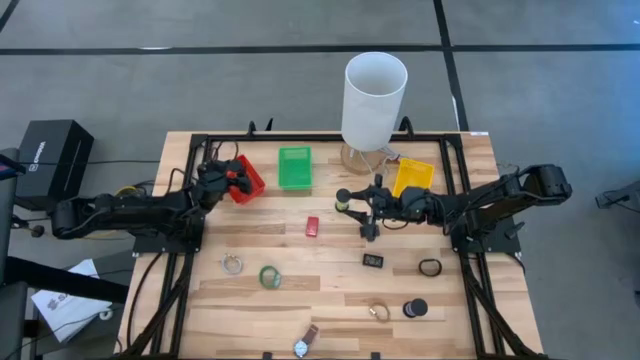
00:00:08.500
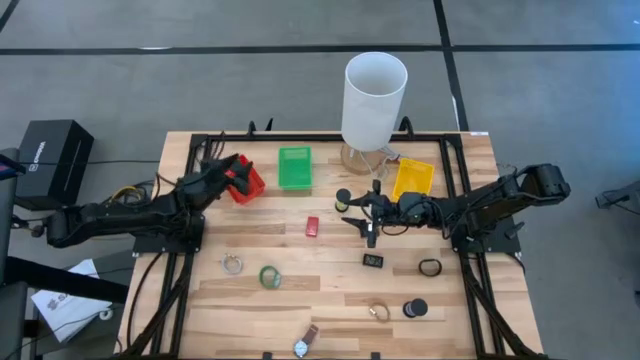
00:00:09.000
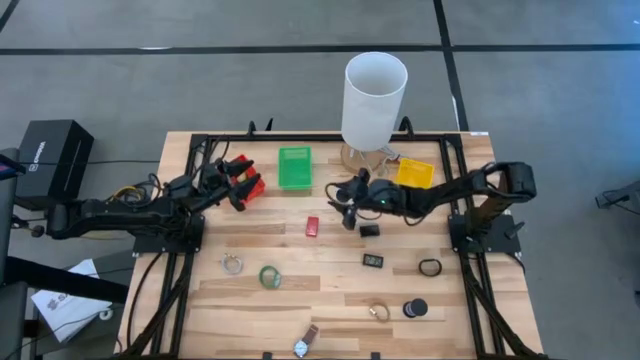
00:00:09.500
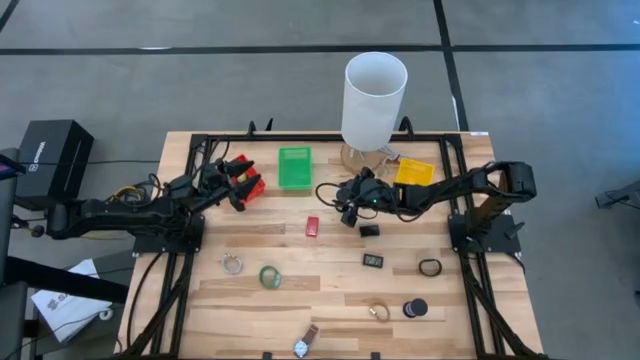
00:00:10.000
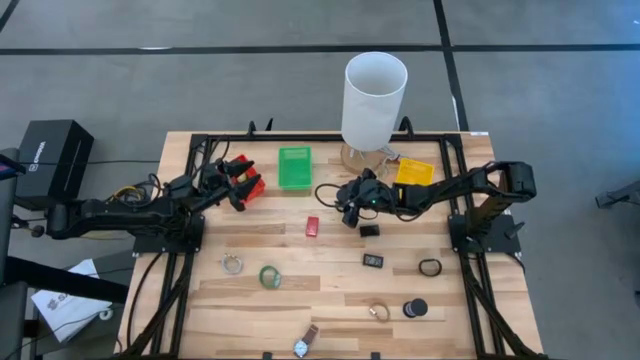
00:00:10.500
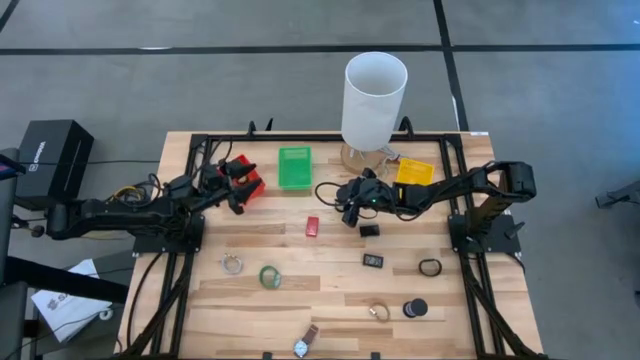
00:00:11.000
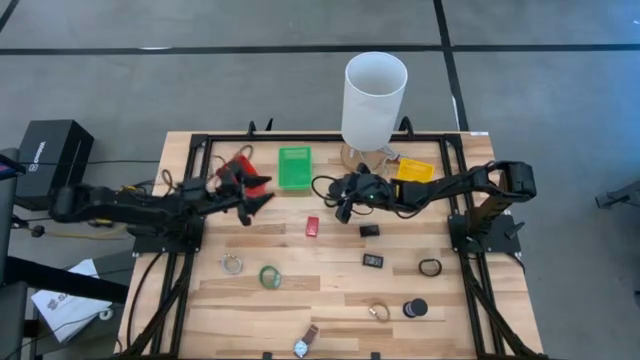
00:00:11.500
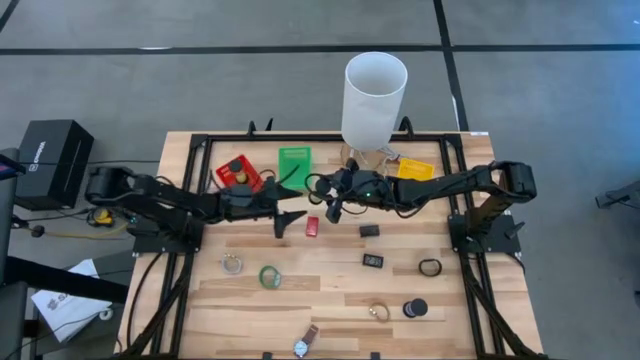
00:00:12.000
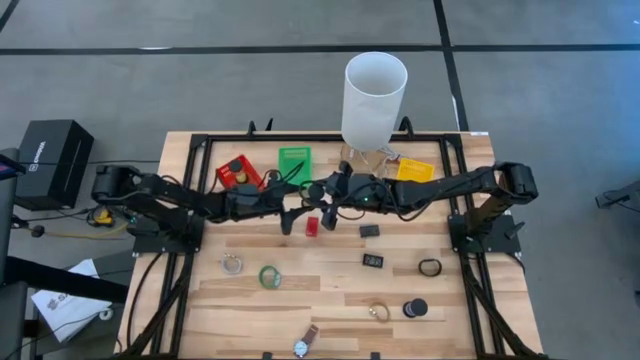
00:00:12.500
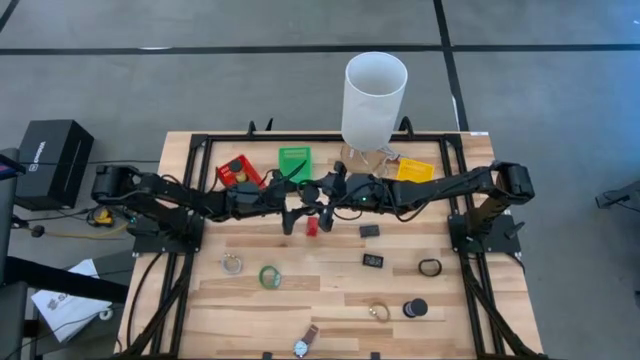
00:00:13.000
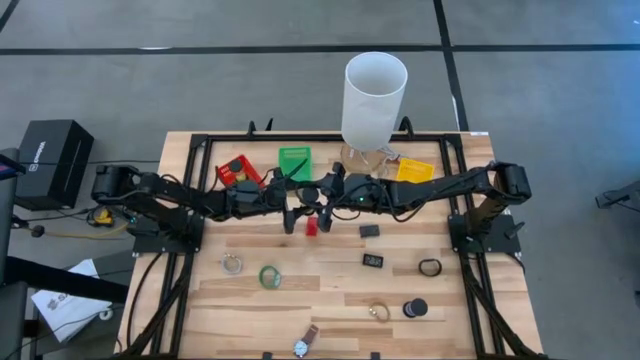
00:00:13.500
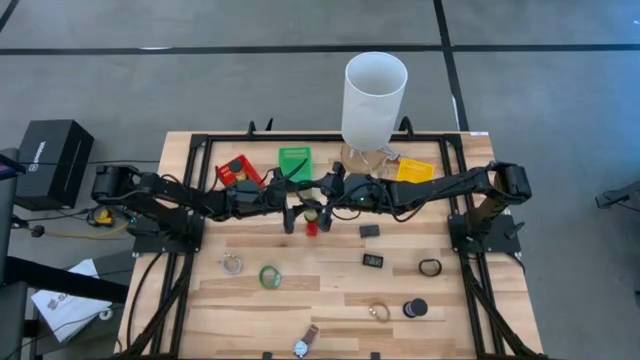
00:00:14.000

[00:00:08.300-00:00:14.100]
Task: Pick & Place Office items
Put the green hourglass into the orange bin

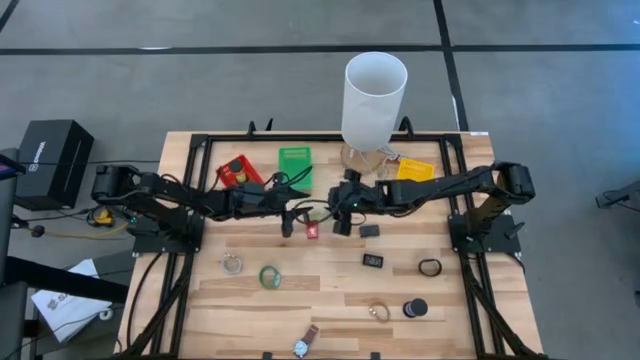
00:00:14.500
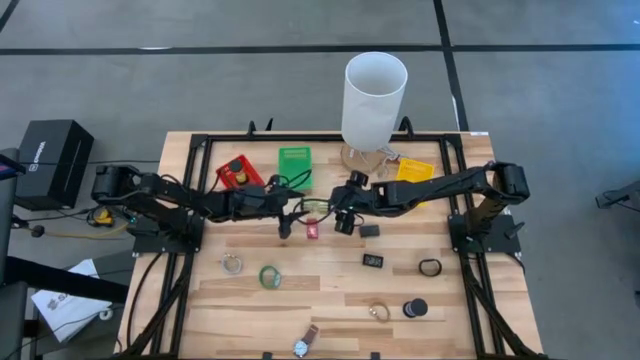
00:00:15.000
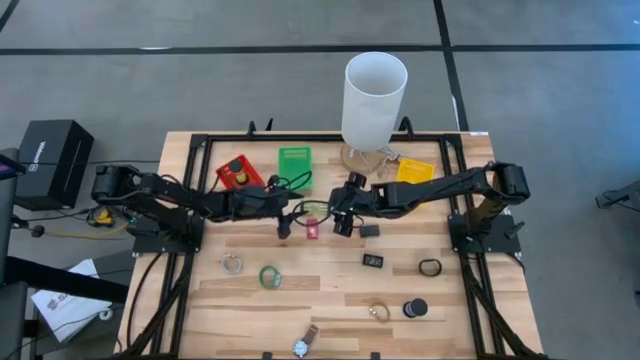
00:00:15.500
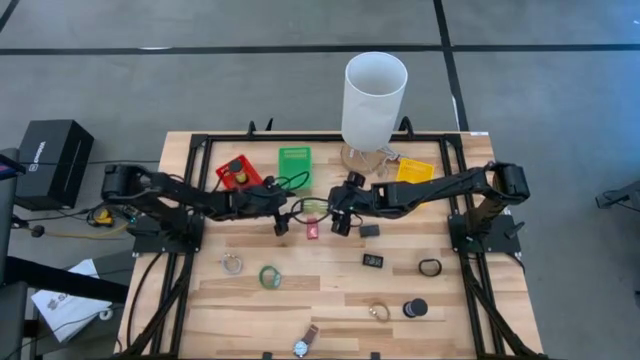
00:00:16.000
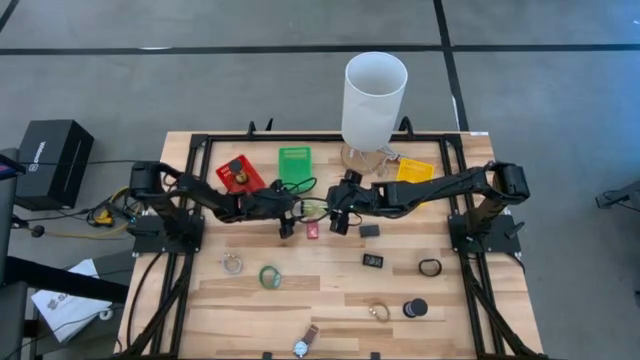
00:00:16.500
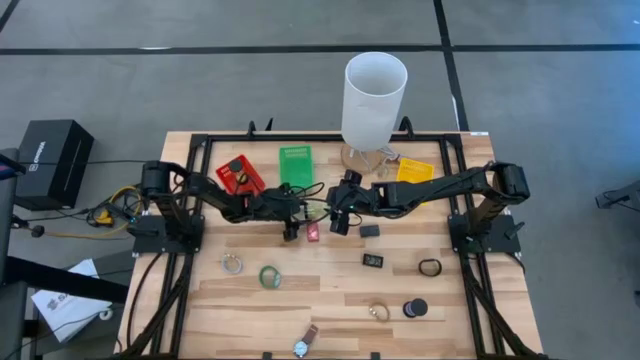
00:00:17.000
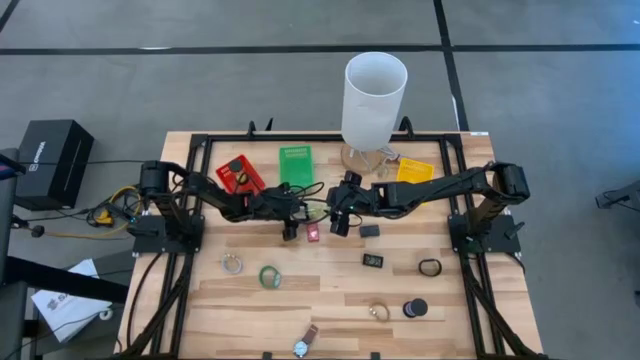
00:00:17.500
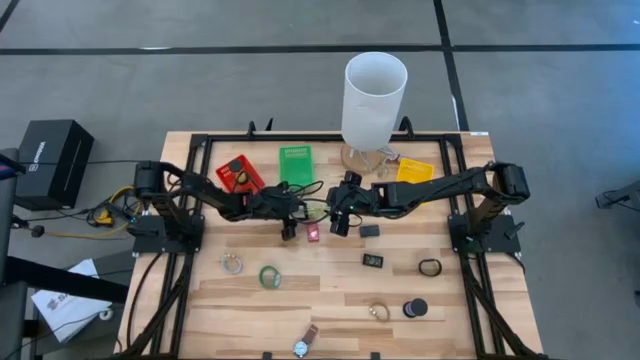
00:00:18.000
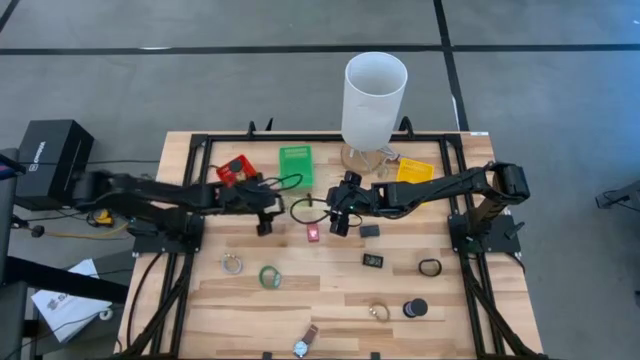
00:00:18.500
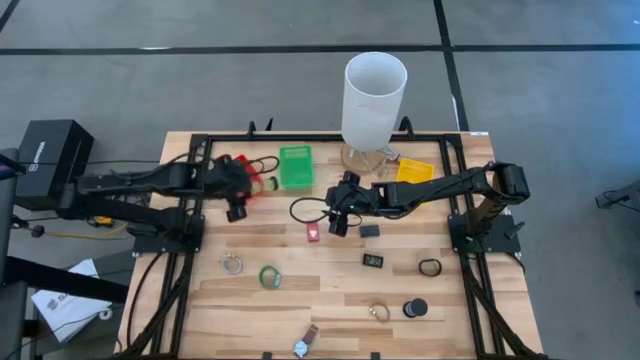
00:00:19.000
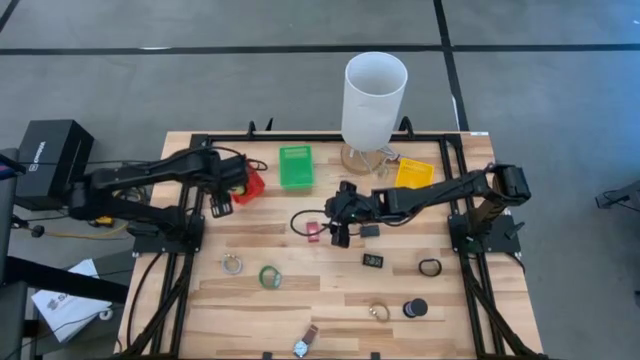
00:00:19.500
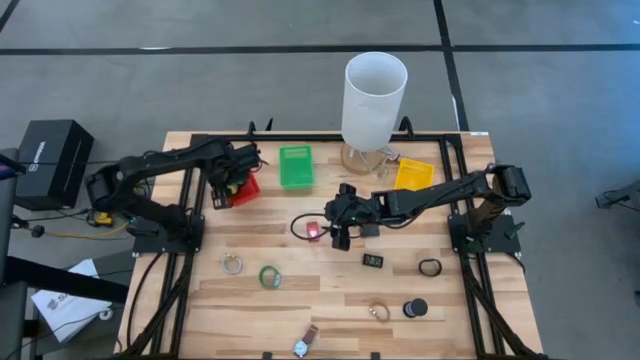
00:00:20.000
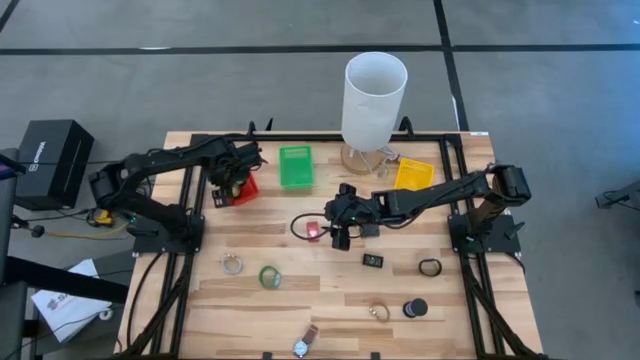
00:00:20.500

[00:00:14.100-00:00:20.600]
Put the green hourglass into the orange bin

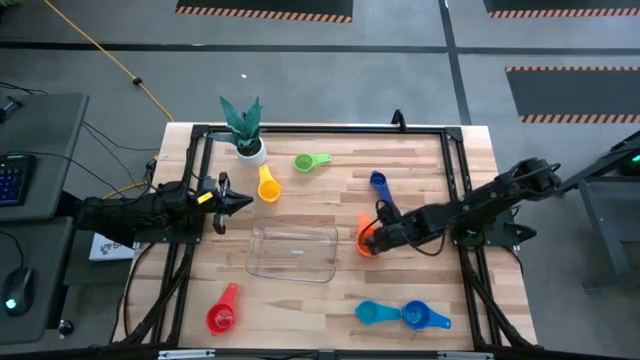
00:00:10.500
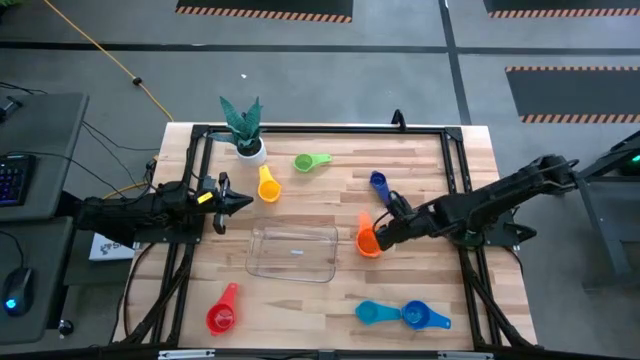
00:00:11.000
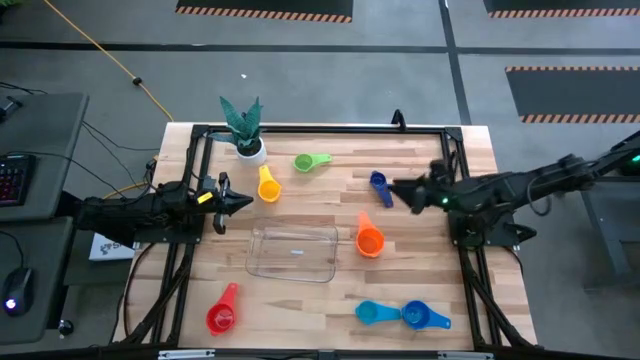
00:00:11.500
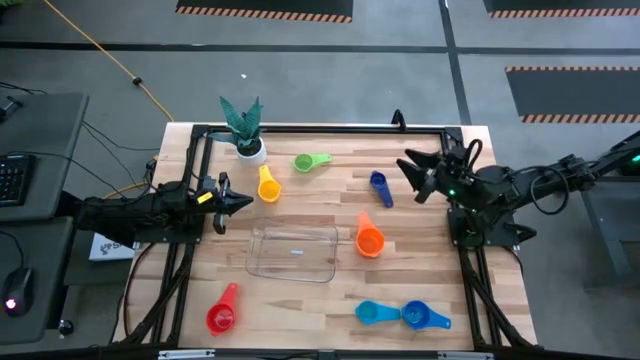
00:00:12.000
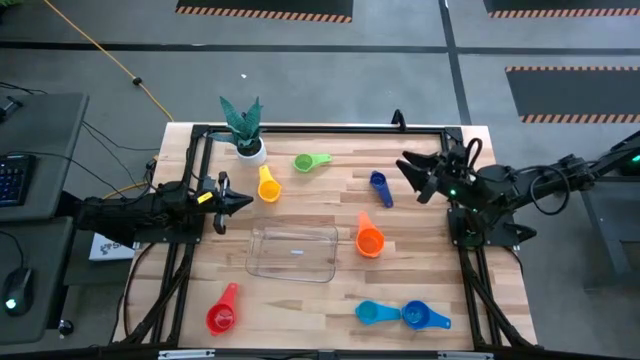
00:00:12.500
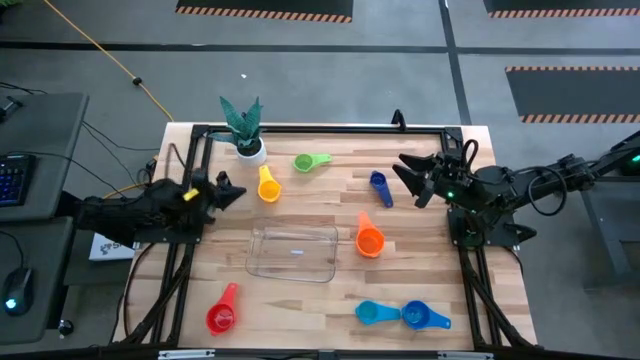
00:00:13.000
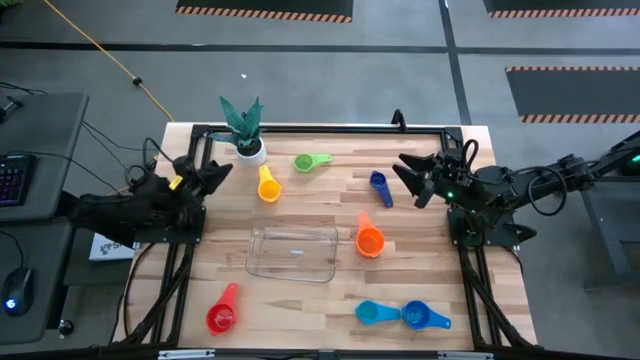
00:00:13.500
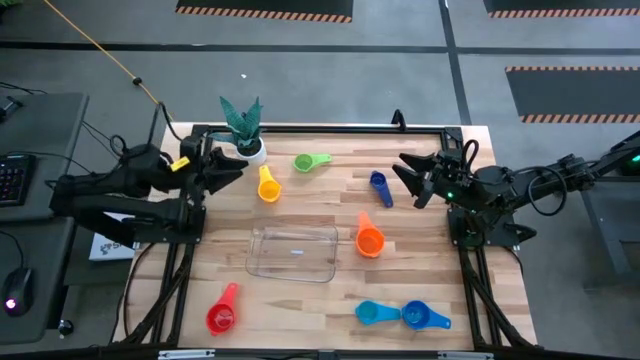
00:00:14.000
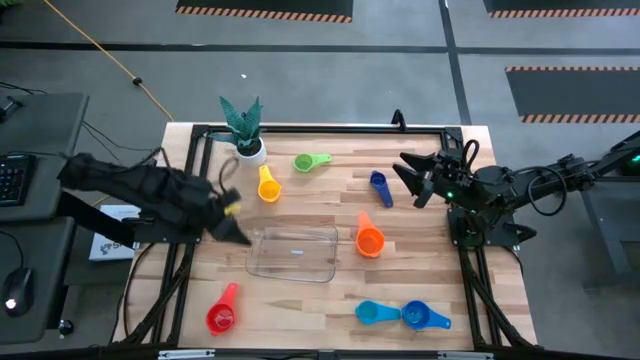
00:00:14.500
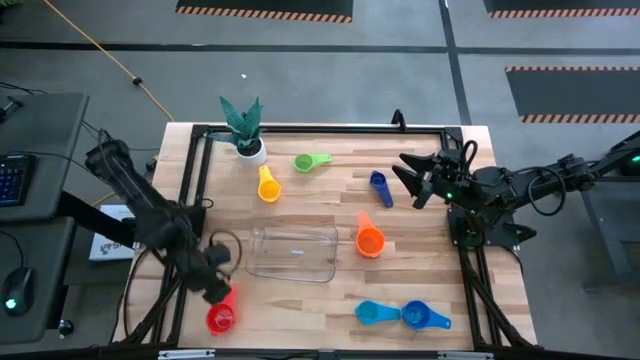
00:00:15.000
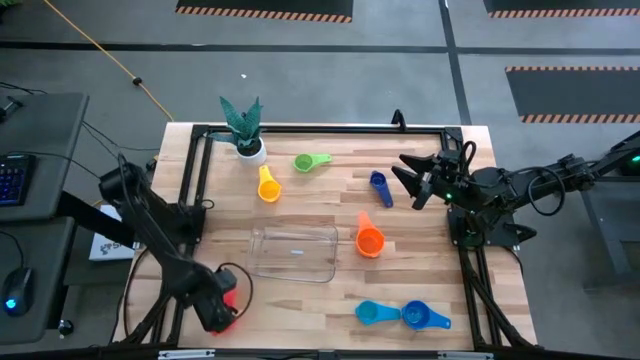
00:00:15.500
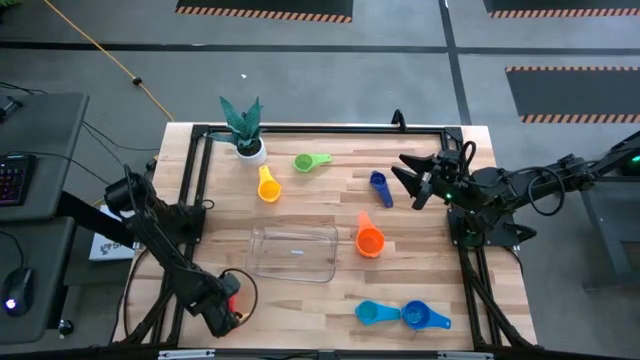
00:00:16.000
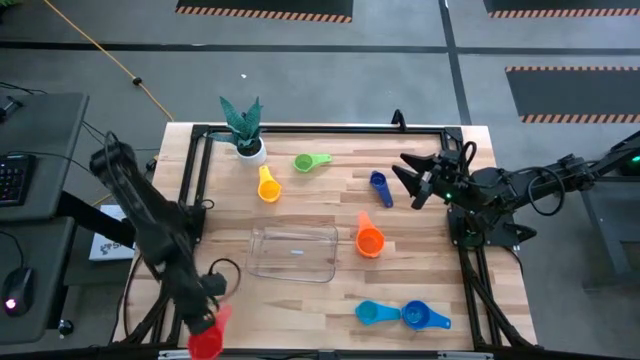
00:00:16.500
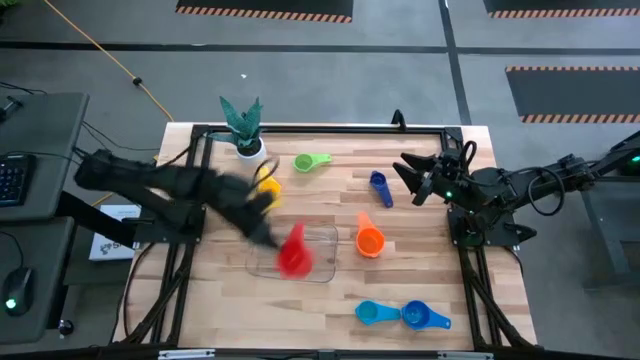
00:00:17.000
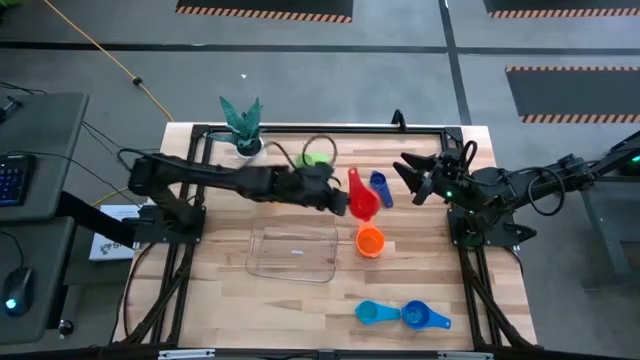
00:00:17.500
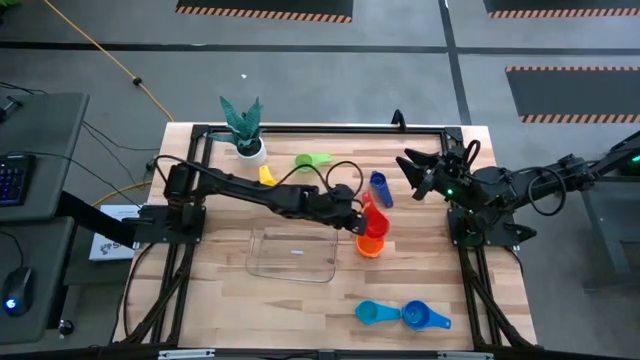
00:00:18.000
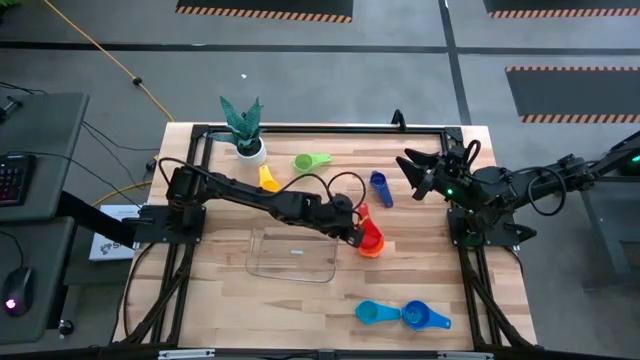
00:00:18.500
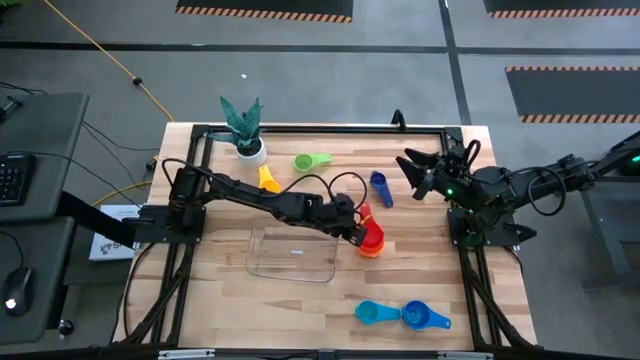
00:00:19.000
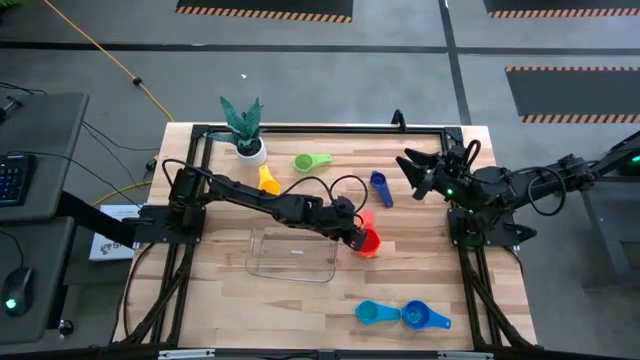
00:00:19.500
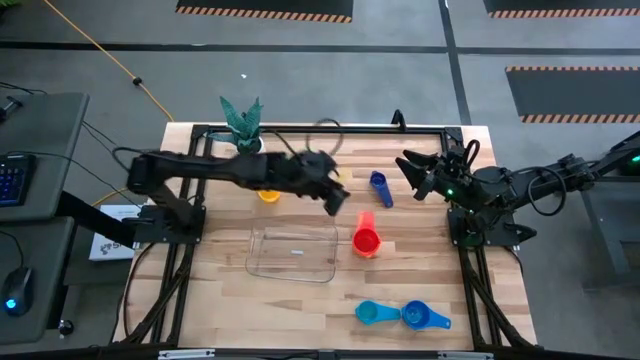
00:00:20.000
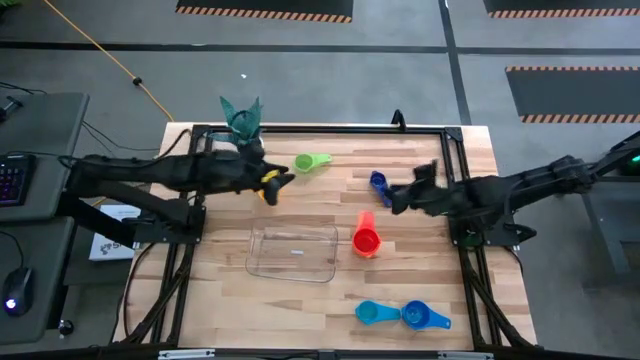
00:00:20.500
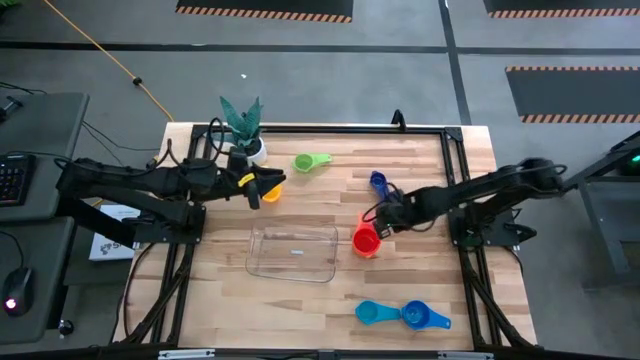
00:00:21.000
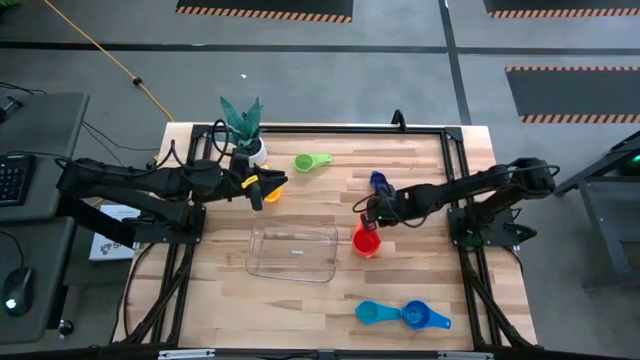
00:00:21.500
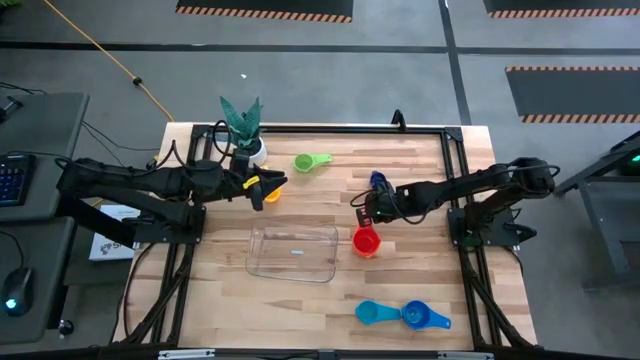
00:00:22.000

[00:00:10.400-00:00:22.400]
Task: Nest measuring cups in basket
Stack the red measuring cup on top of the orange measuring cup
